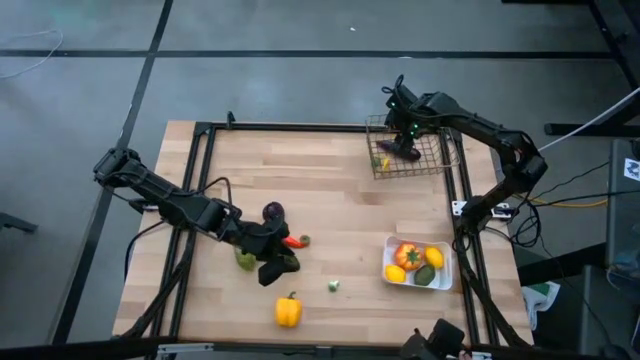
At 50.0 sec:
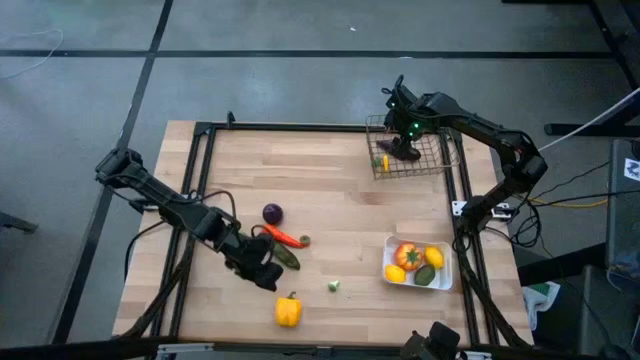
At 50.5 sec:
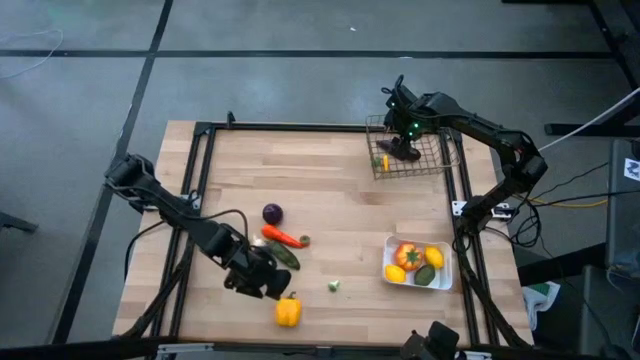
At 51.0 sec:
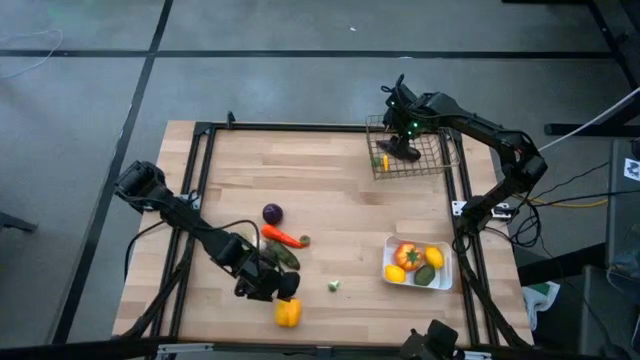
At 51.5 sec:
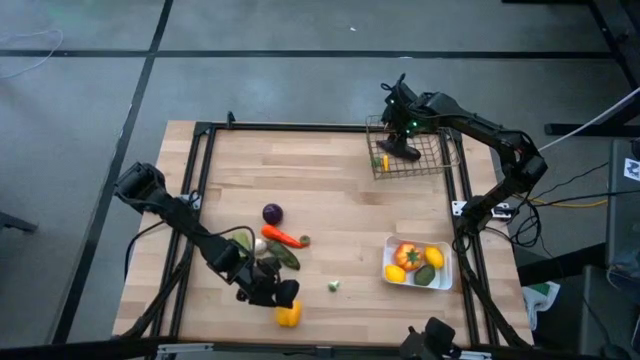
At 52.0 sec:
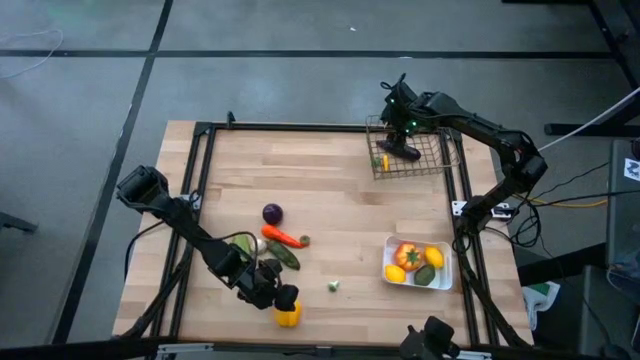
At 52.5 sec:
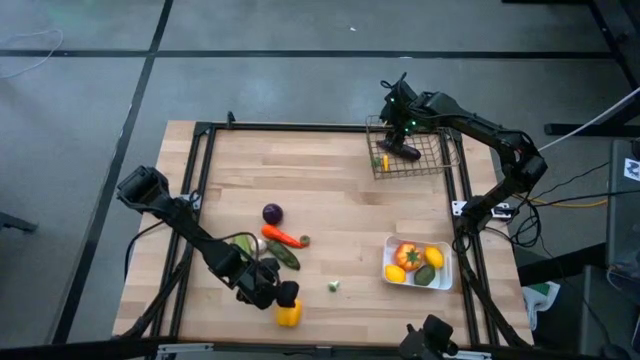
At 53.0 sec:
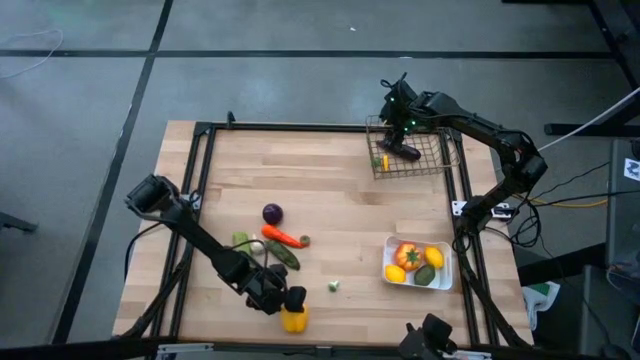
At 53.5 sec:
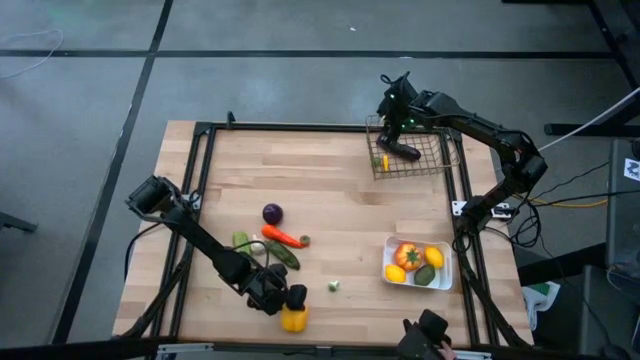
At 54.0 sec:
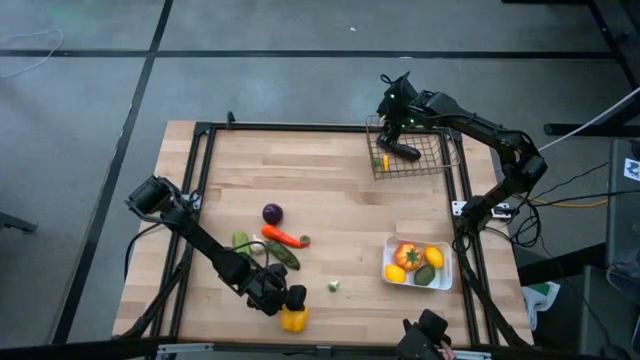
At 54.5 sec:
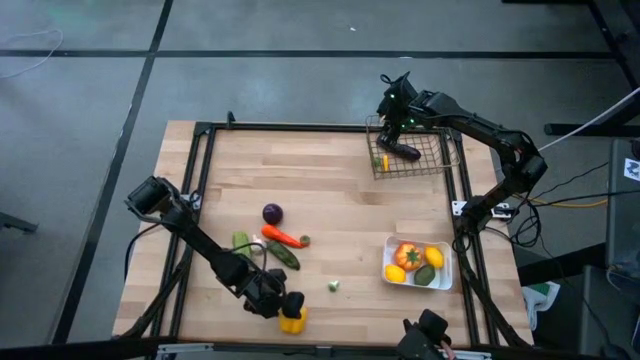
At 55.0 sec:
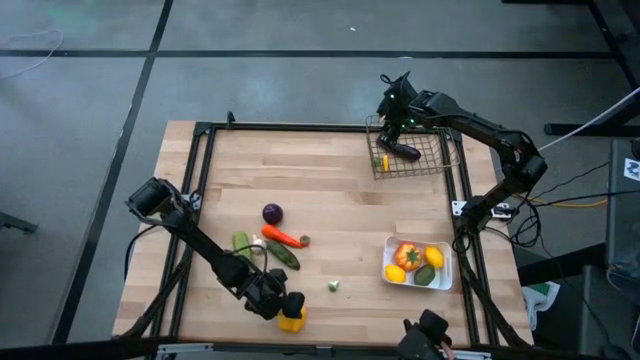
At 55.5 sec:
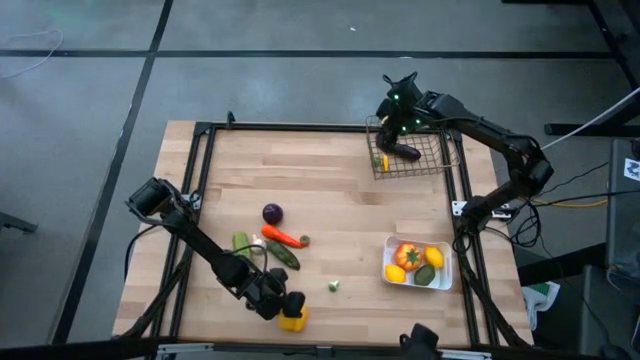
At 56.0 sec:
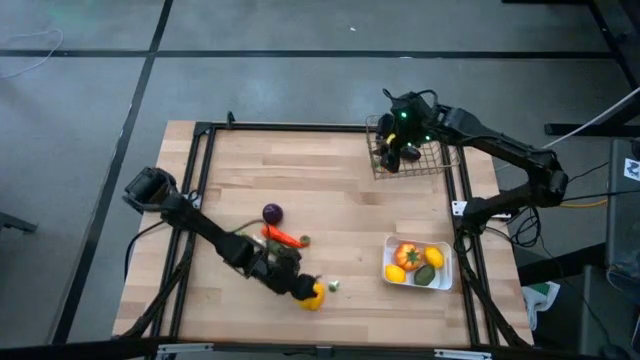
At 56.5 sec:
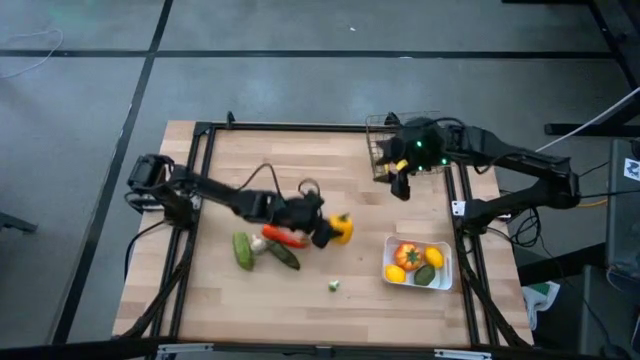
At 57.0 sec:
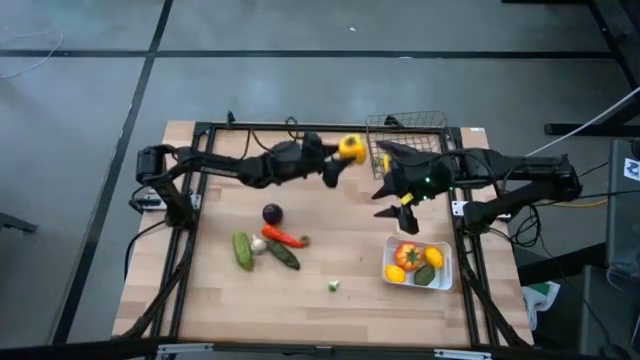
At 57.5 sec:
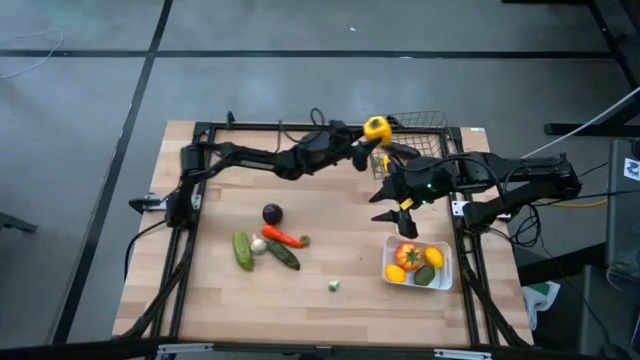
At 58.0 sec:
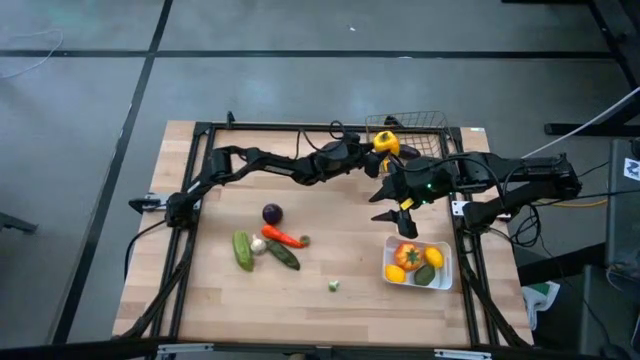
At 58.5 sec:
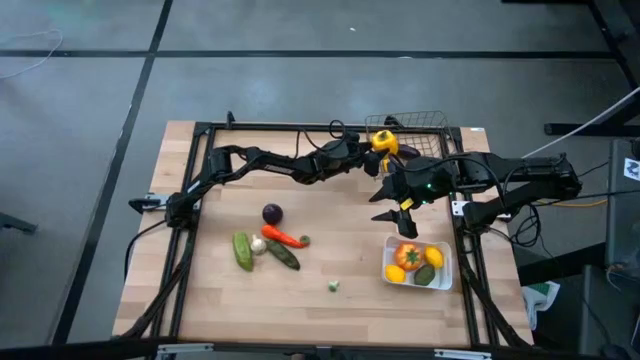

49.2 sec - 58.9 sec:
Task: Sort produce into baskets
Put the yellow bell pepper into the black wire basket

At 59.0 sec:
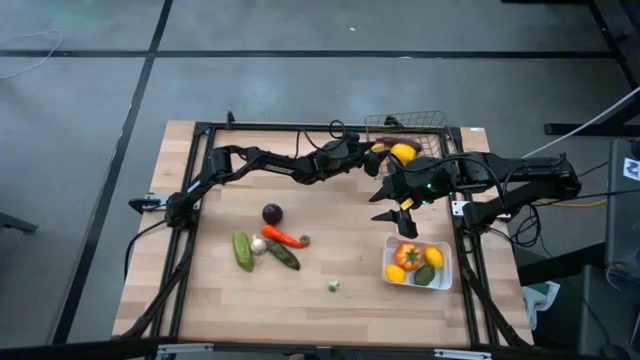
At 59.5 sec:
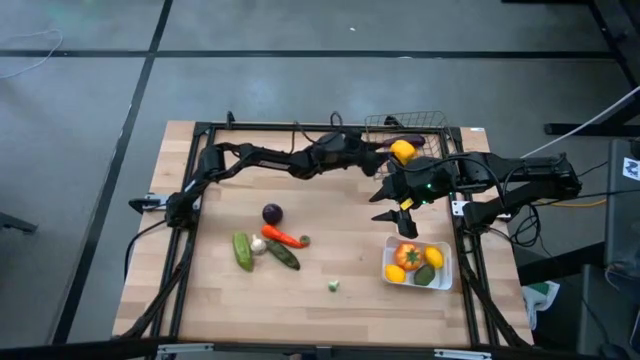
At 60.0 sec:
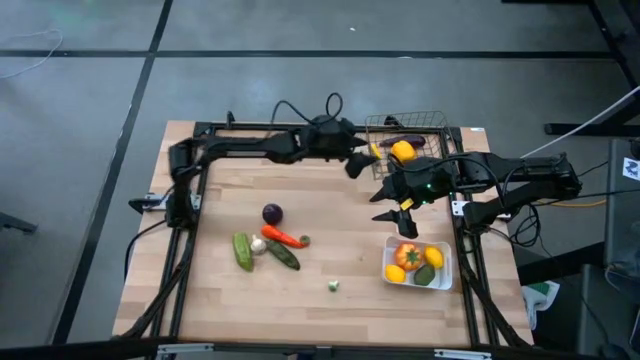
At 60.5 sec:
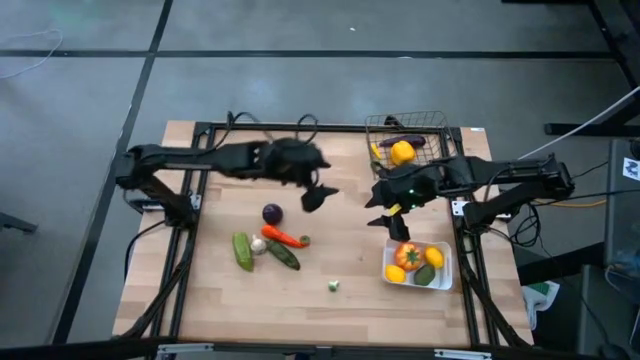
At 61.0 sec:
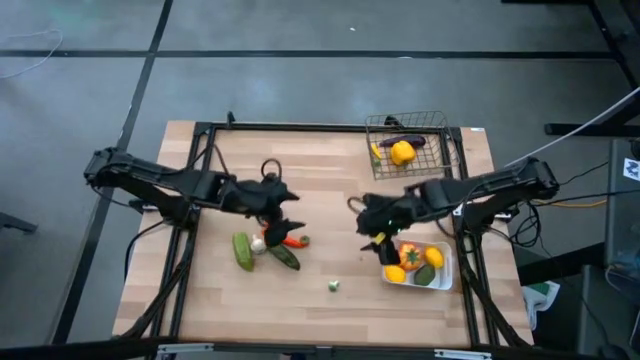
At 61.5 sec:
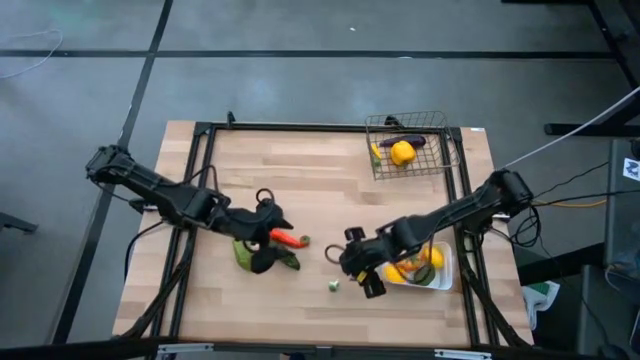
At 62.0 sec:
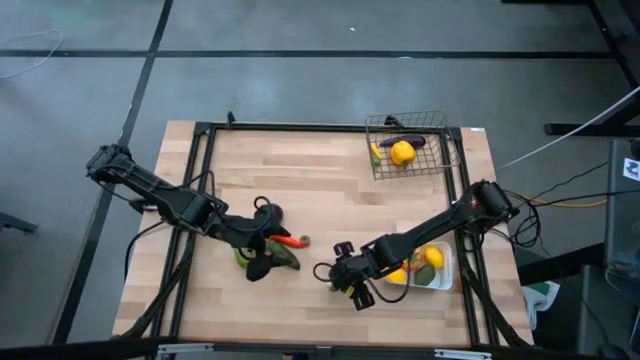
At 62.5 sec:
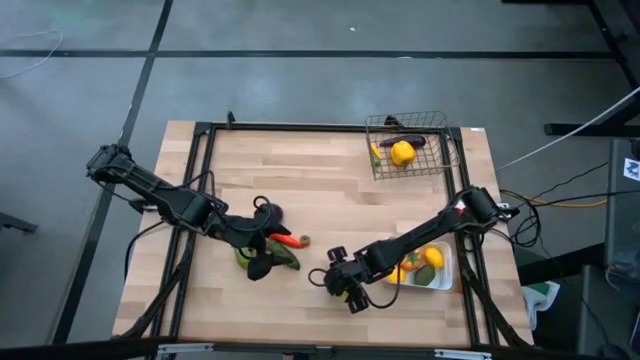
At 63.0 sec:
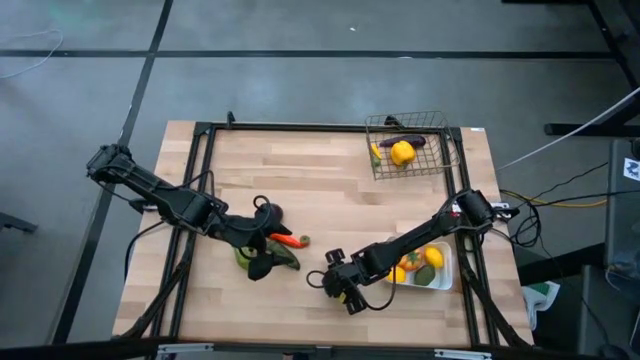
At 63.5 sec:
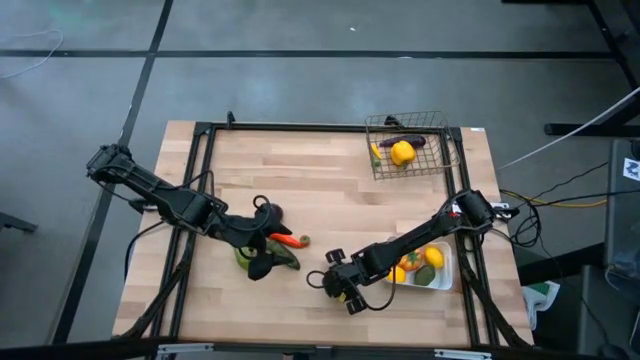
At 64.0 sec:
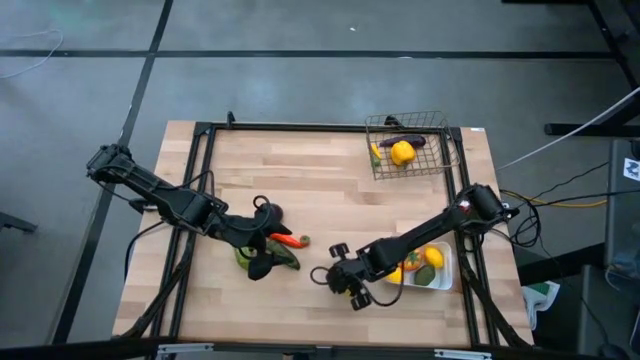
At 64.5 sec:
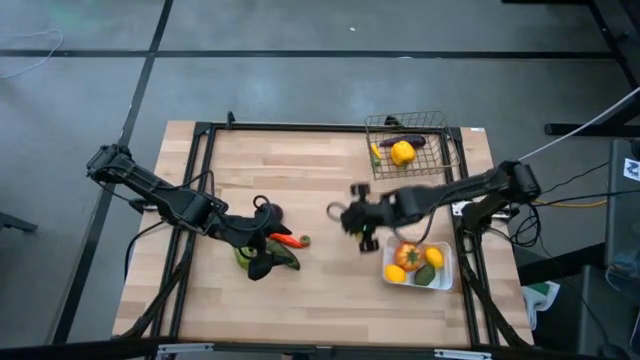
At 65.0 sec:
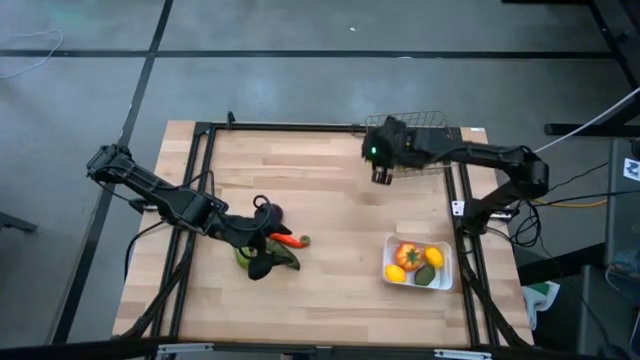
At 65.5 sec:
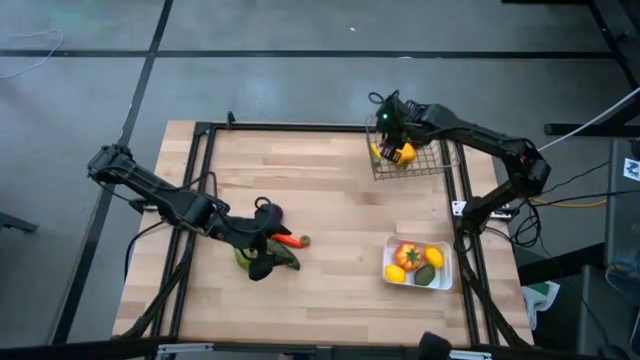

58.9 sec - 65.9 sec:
Put the green mushroom into the black wire basket

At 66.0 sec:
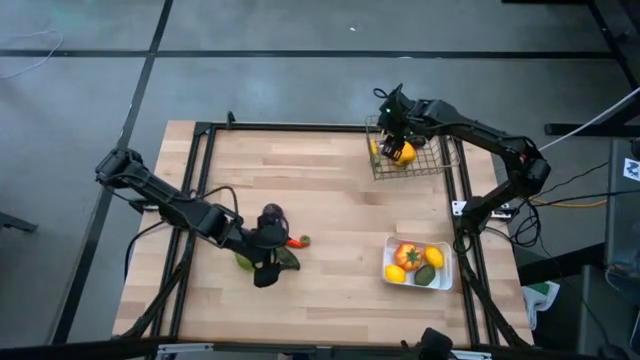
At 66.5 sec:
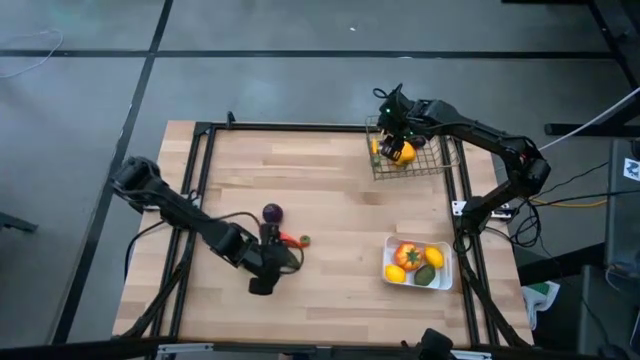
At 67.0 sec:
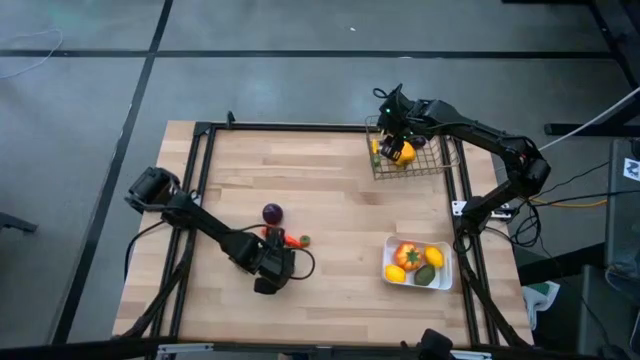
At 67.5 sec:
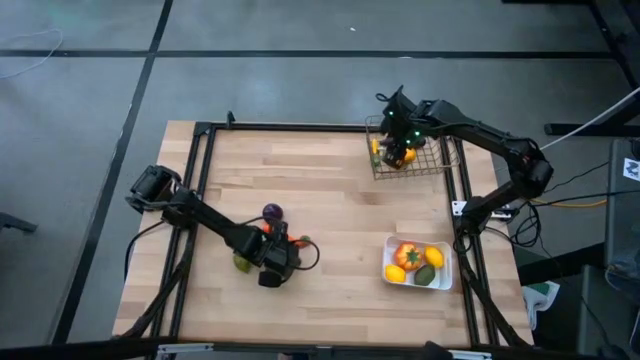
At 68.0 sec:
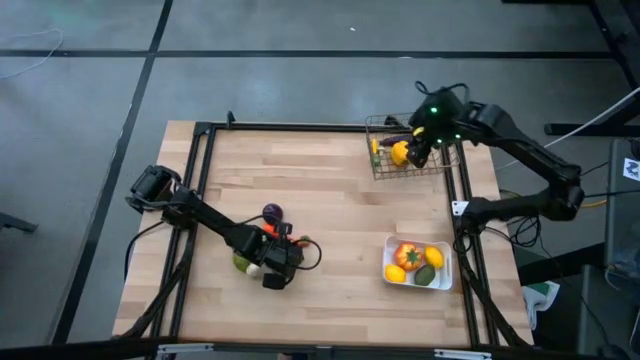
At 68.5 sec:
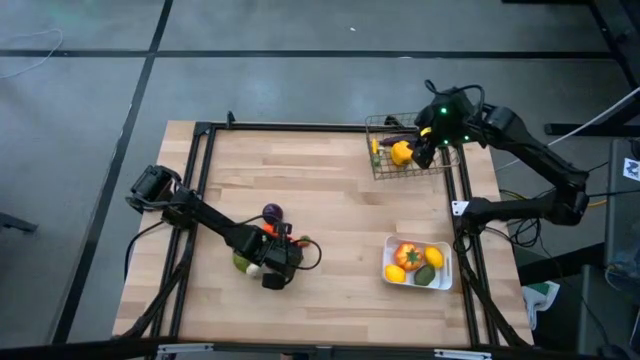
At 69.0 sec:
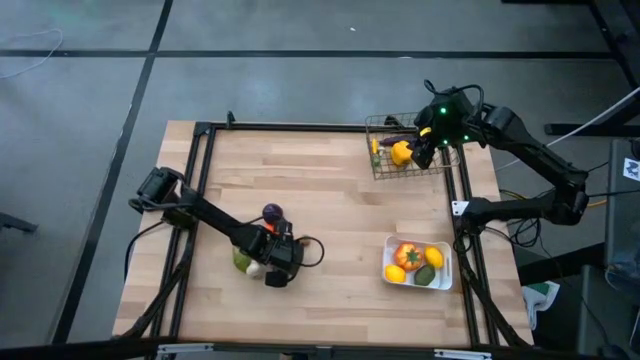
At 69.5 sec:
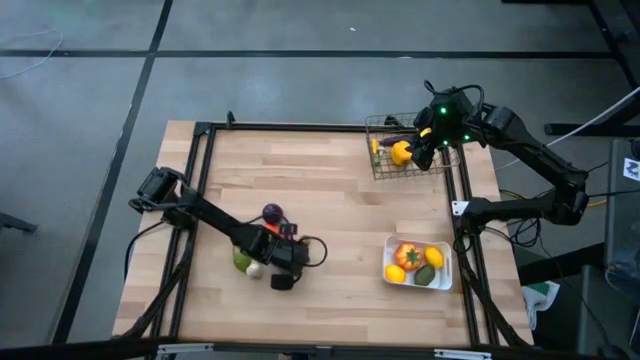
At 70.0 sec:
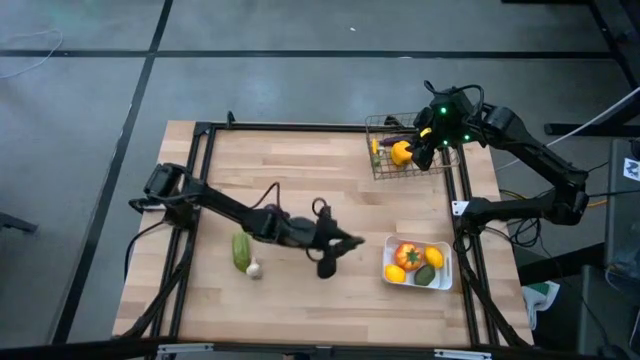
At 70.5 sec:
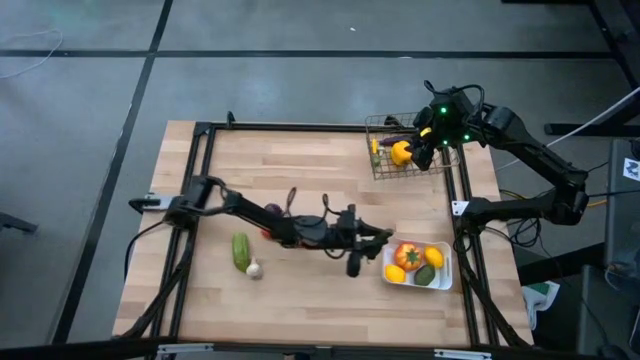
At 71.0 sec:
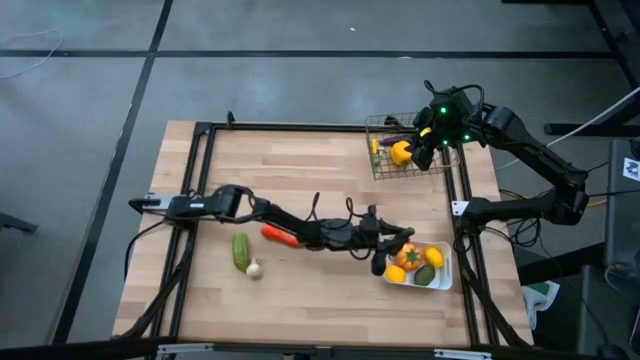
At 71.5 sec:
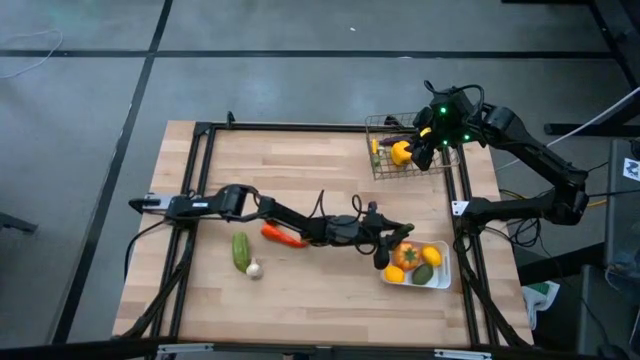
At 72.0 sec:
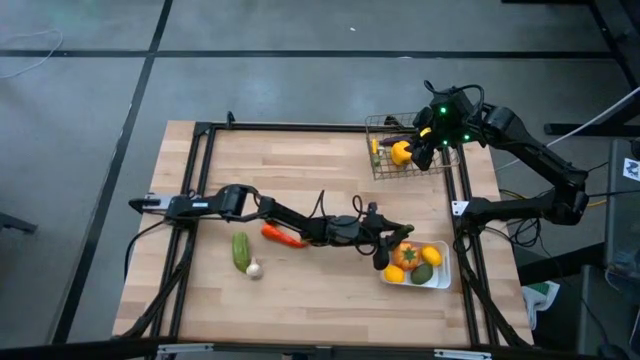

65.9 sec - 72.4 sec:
Put the green chili pepper into the black wire basket
